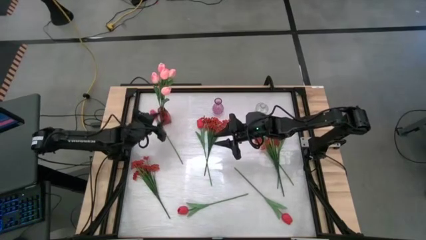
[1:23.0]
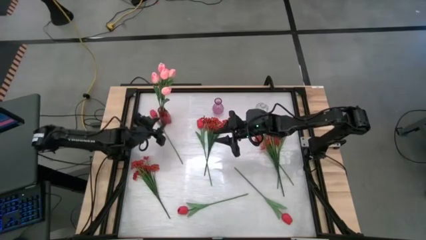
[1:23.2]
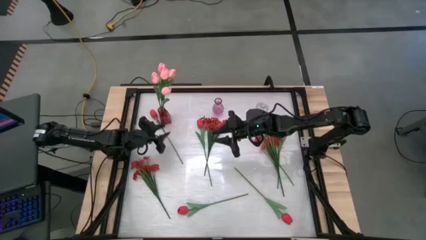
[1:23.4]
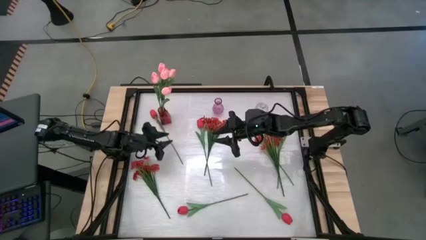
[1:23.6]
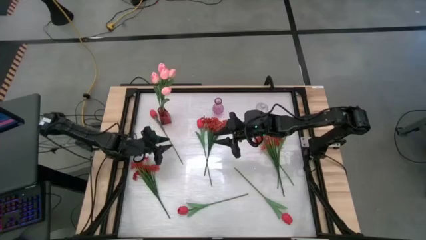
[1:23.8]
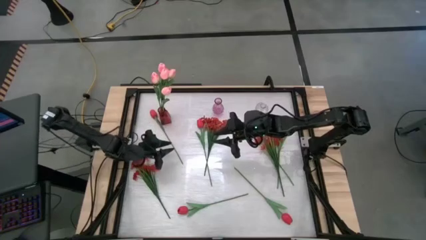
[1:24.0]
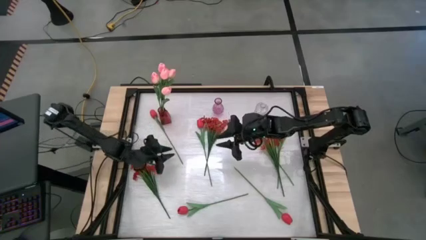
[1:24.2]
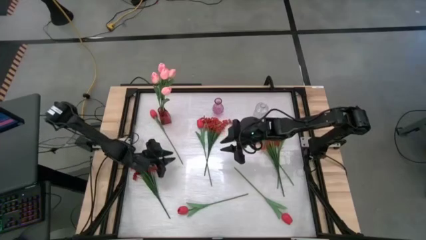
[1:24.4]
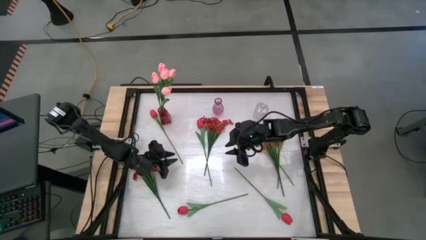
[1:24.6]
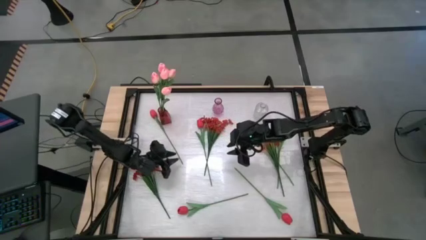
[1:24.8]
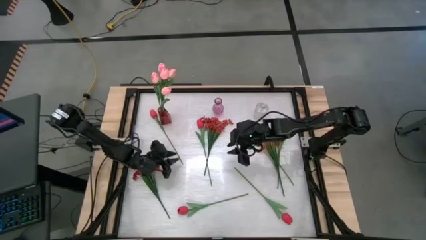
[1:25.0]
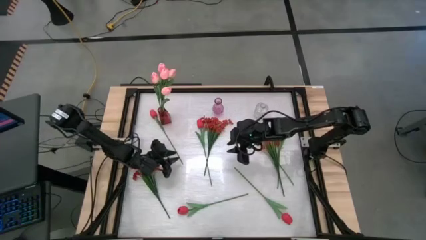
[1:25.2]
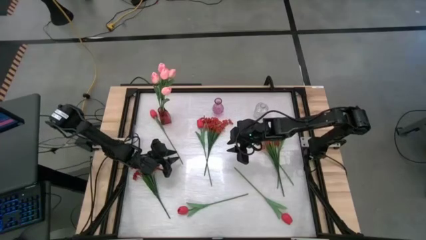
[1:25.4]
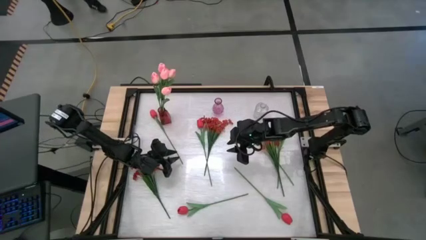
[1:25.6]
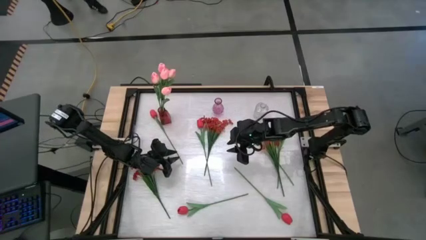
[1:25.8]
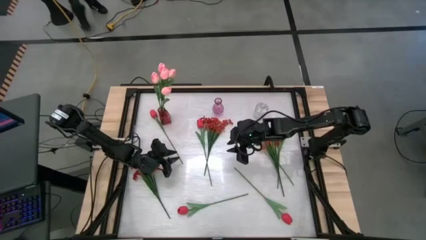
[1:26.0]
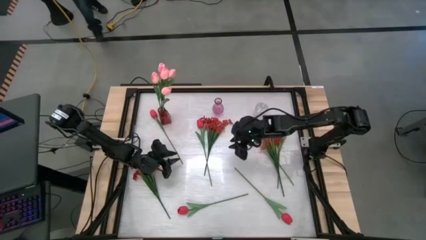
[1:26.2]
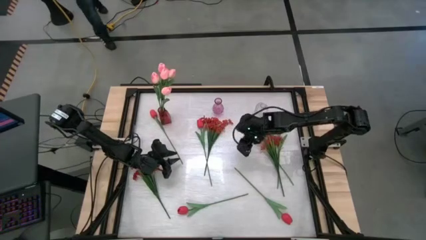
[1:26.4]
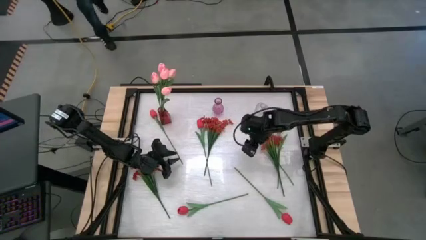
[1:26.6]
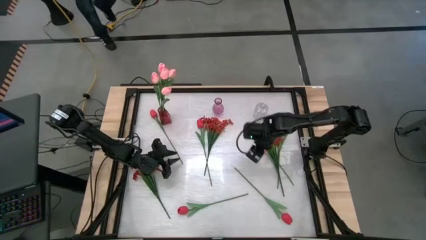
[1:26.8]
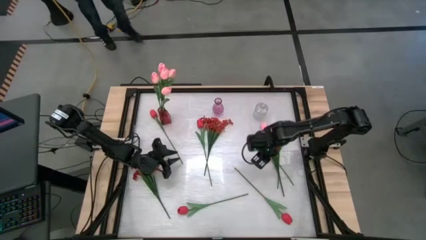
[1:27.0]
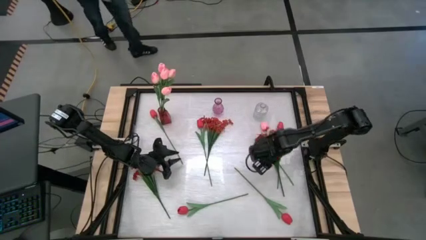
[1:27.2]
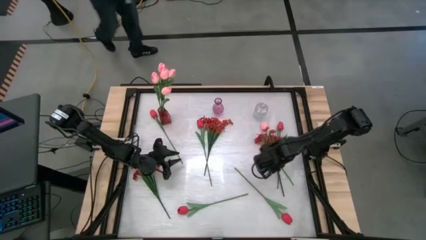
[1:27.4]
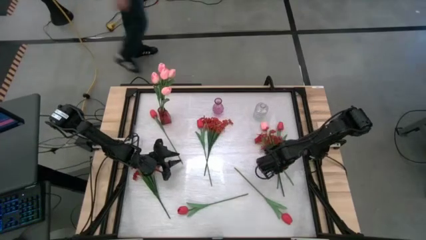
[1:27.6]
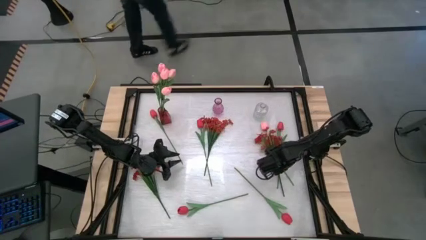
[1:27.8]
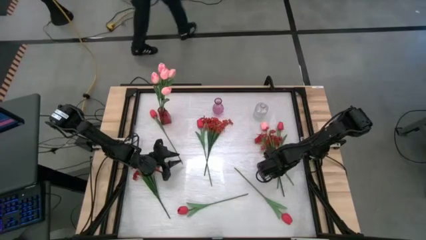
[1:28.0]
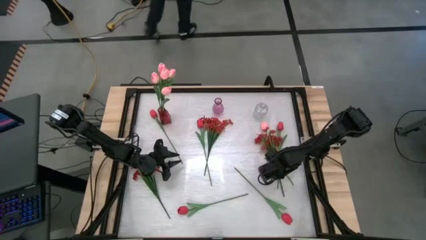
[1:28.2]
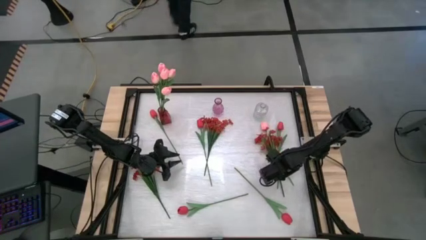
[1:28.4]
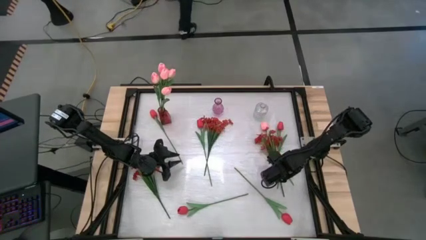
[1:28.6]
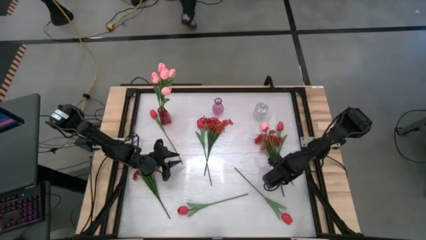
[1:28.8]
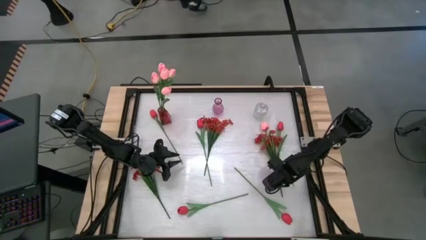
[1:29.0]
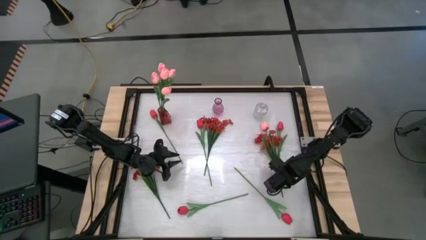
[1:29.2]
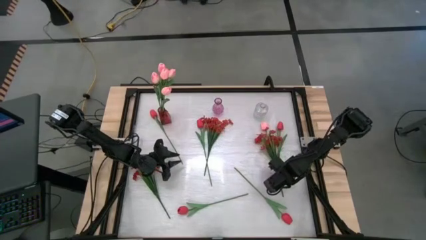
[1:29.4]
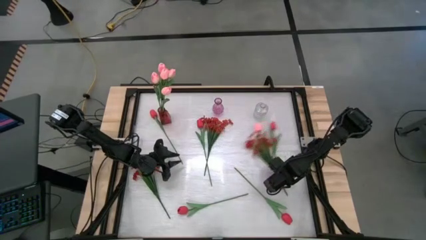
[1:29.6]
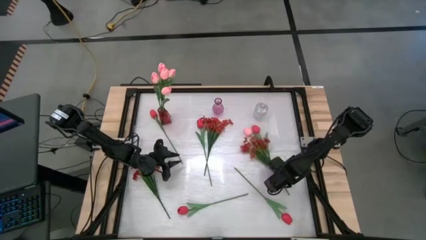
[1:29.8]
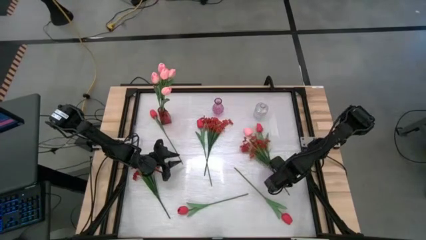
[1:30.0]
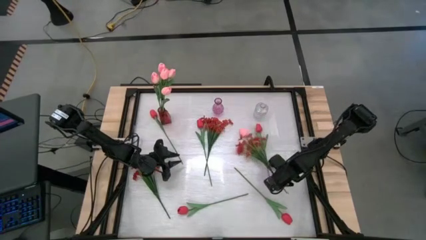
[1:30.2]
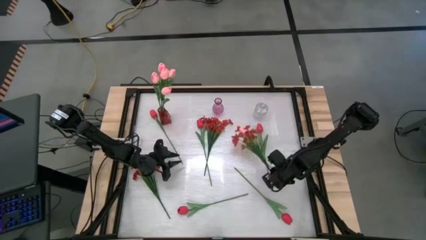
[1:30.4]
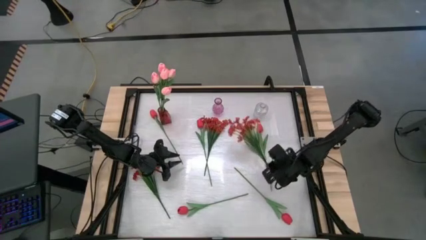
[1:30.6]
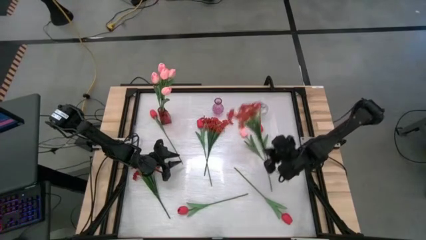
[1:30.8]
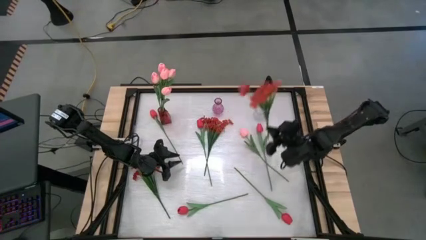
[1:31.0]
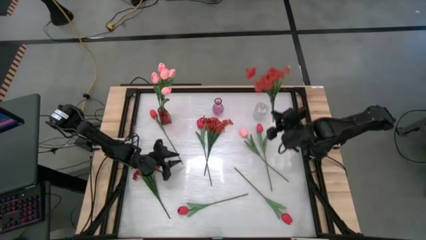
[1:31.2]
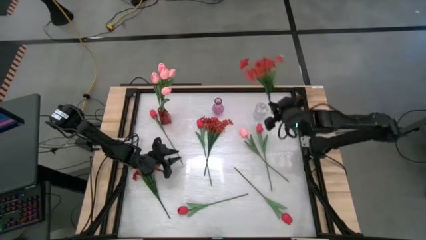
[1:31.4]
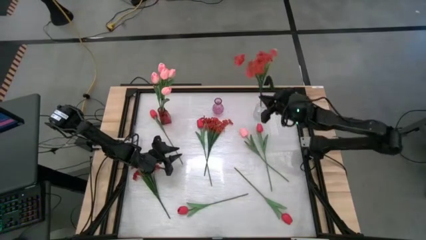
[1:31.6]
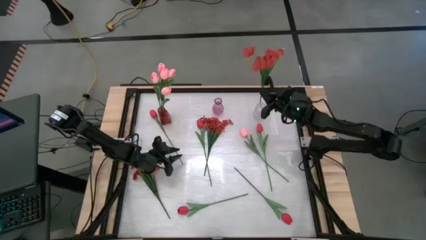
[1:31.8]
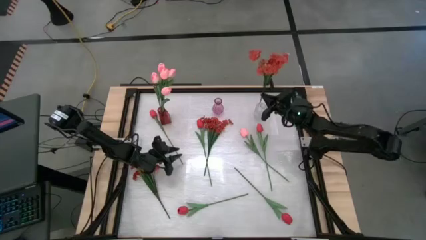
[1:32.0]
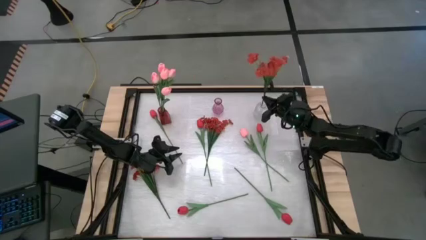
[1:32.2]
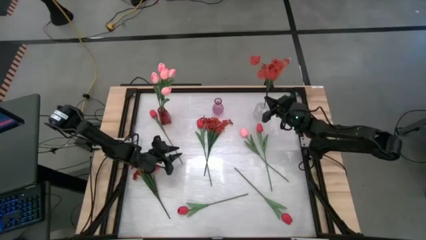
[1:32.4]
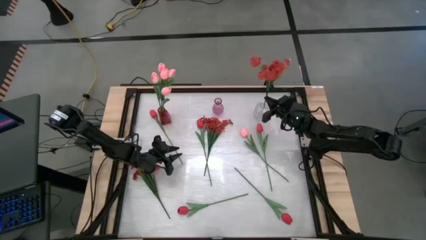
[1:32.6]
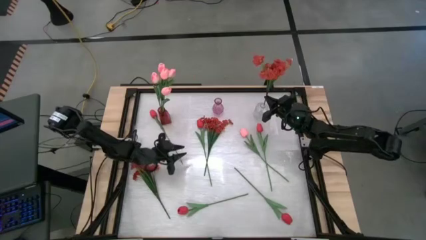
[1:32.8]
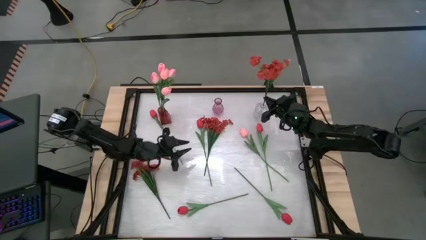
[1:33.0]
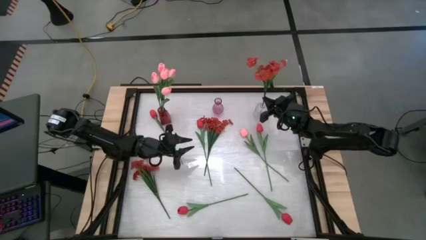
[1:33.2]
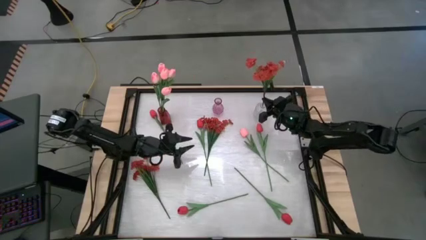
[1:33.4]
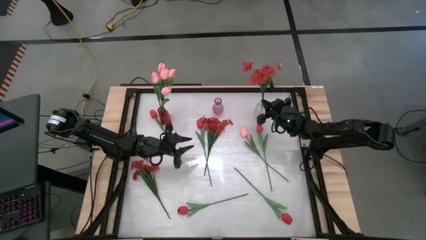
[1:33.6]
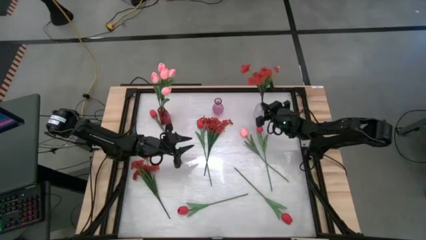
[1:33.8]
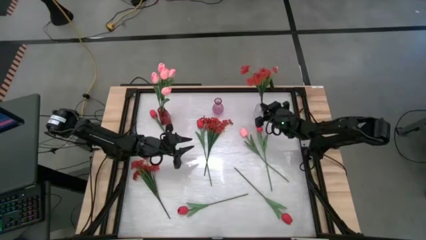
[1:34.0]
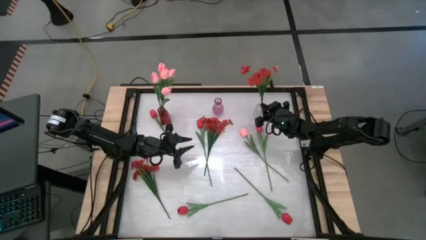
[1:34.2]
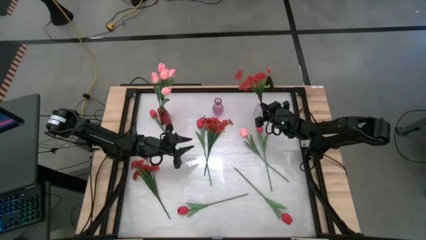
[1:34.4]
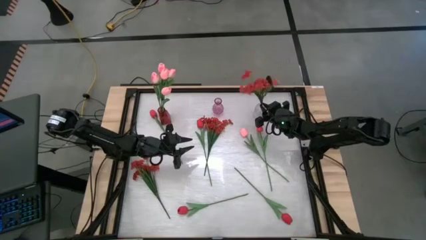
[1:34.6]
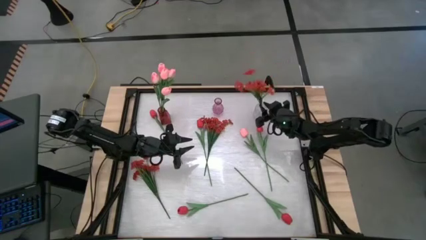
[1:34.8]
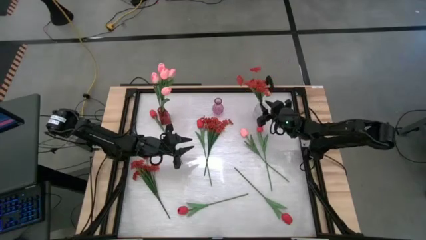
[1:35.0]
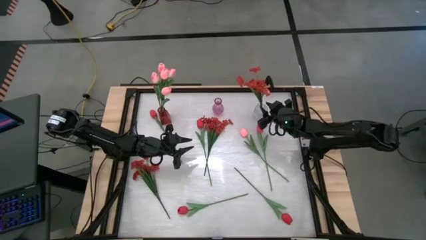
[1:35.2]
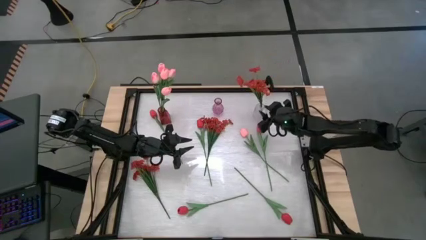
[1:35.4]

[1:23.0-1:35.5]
Task: Sort flowers into vase by color
Put the red flowers into the transparent vase

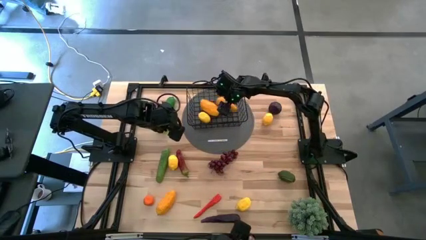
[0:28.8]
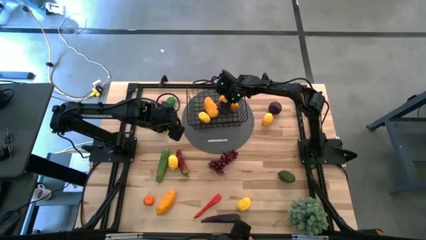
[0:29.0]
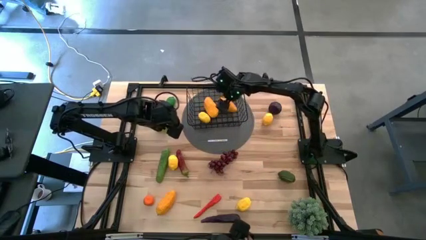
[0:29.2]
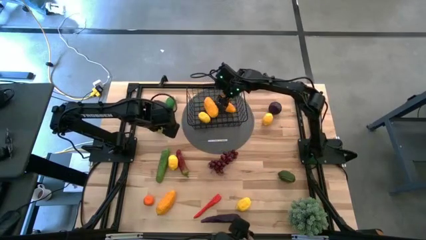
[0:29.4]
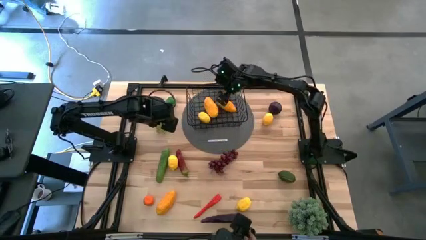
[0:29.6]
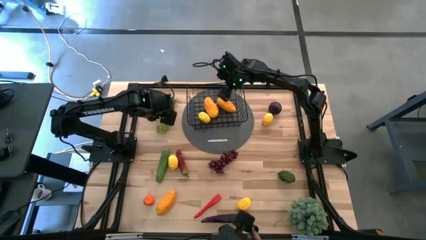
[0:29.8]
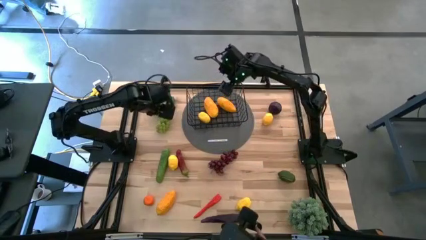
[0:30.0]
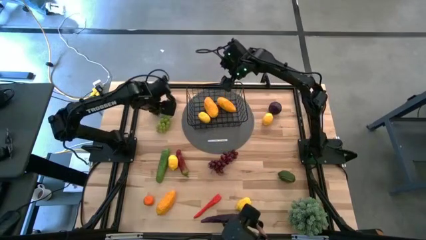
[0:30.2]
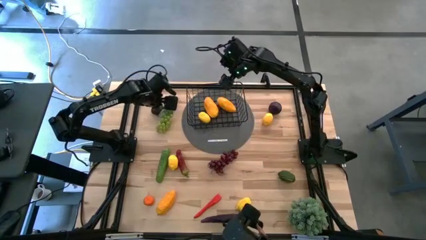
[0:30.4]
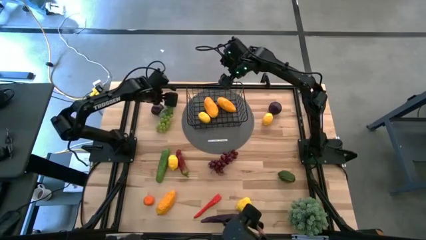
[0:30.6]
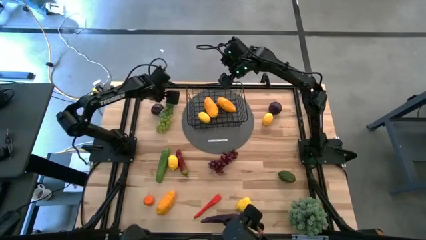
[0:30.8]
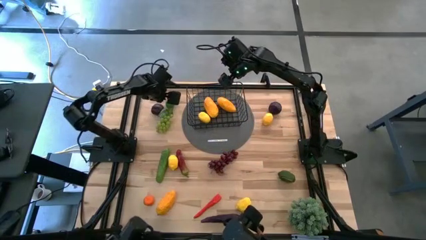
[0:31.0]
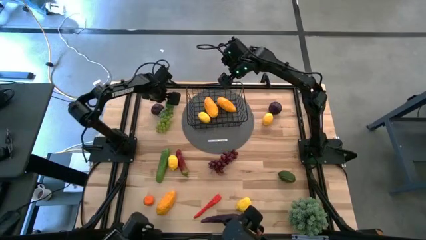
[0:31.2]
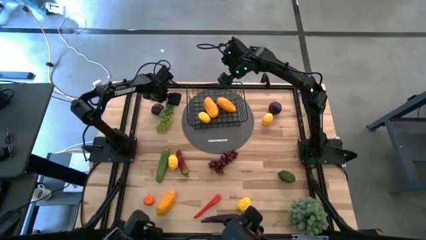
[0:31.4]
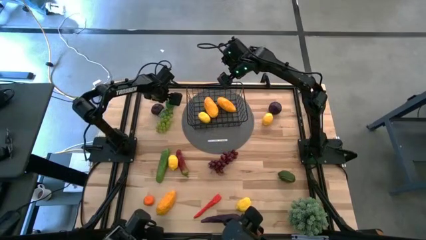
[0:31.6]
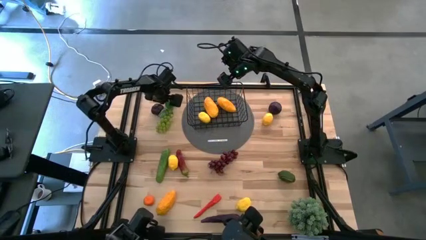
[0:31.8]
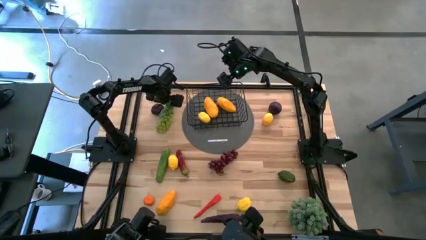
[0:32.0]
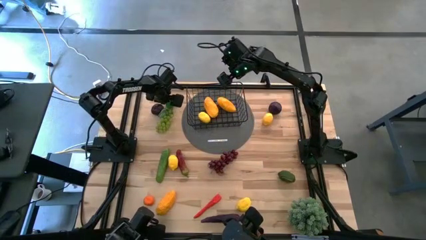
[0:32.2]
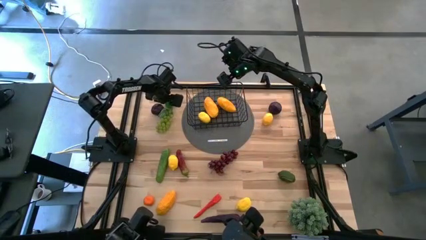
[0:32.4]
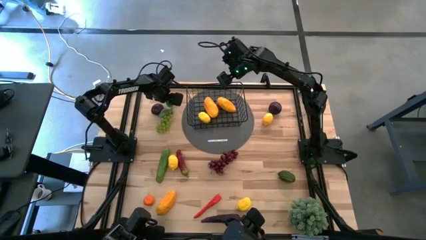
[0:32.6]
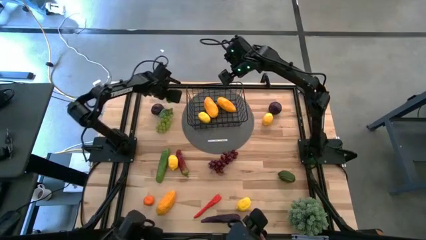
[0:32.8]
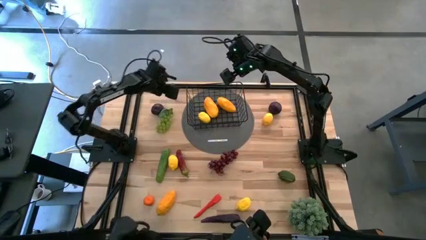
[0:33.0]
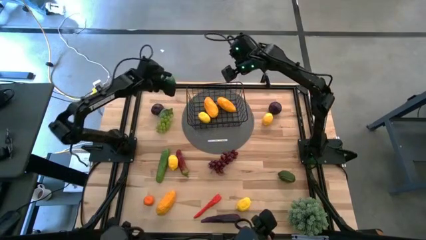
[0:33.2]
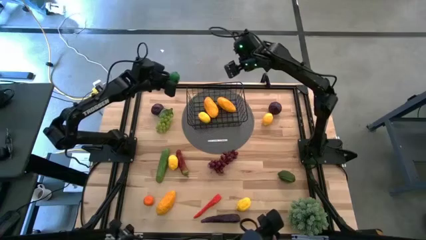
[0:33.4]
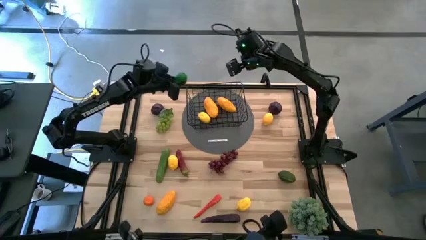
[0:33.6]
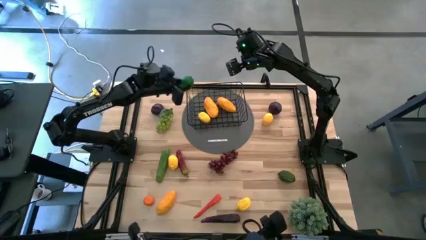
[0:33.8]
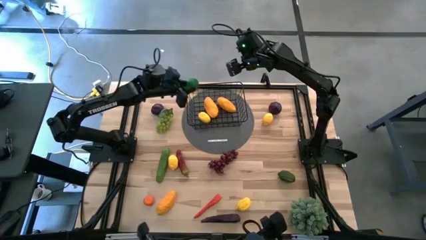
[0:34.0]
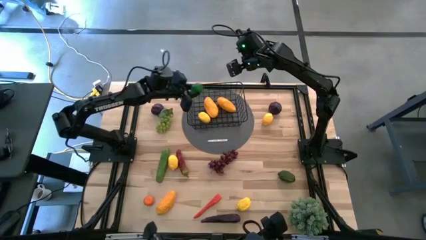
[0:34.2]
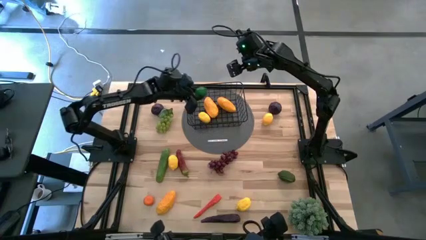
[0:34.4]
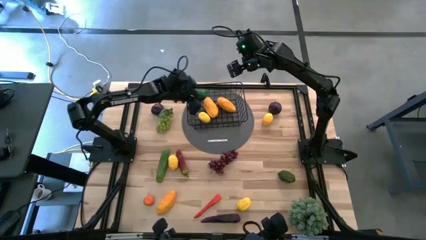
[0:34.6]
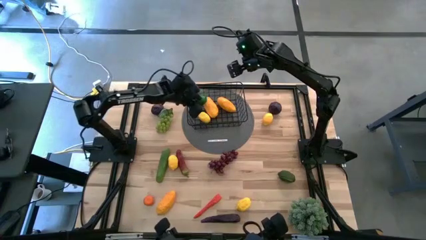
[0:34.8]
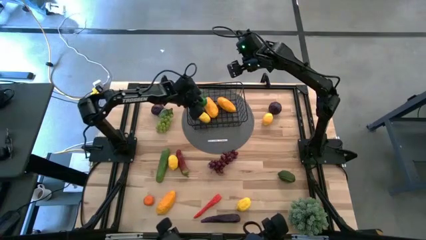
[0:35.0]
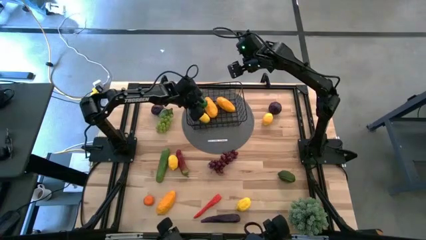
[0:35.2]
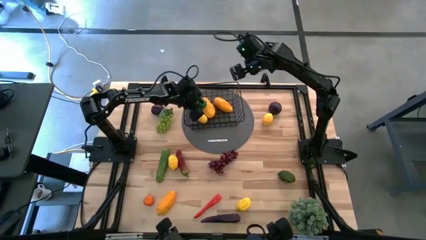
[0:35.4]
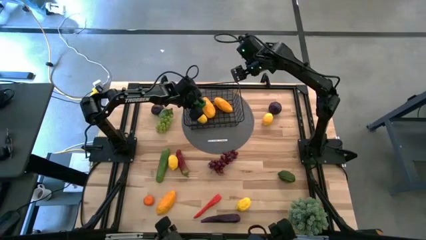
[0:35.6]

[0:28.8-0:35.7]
Task: Build produce basket
Put the top lime into the wire basket
